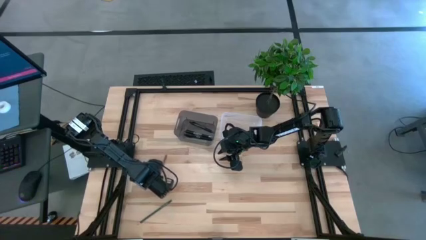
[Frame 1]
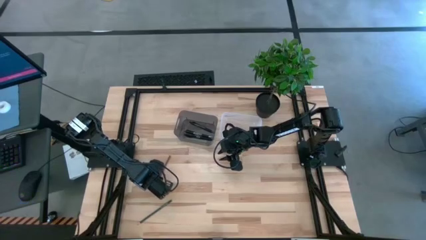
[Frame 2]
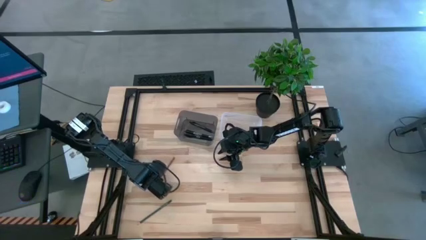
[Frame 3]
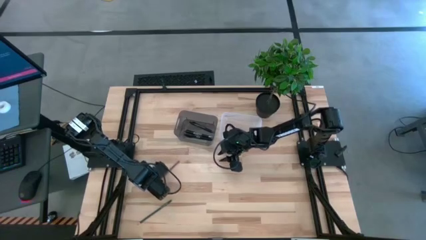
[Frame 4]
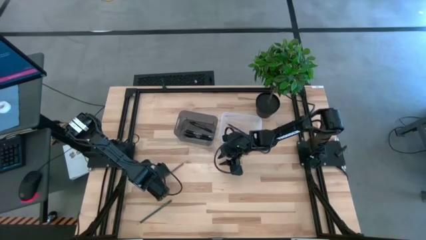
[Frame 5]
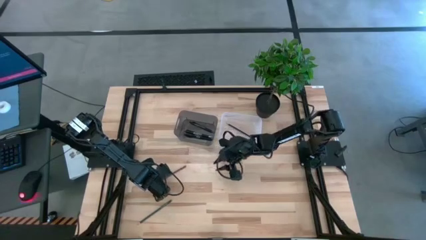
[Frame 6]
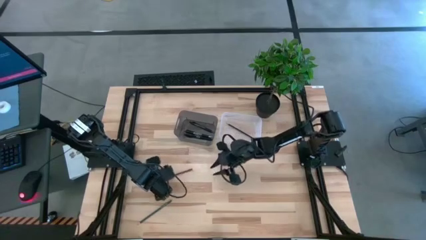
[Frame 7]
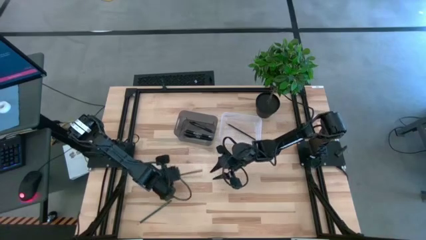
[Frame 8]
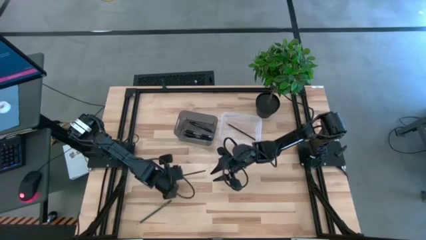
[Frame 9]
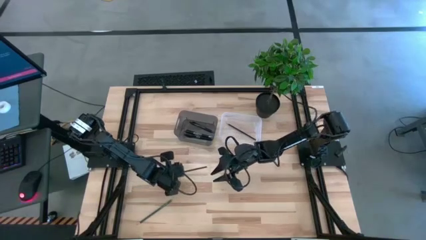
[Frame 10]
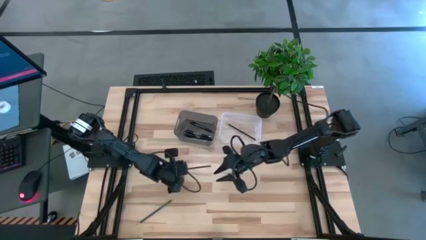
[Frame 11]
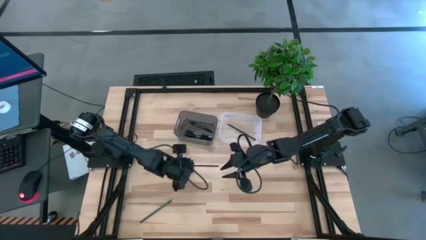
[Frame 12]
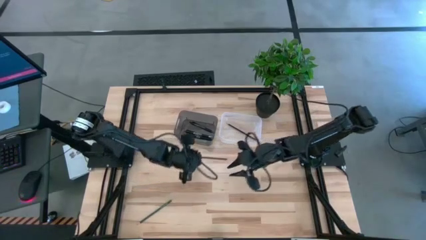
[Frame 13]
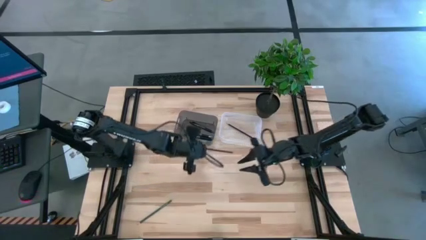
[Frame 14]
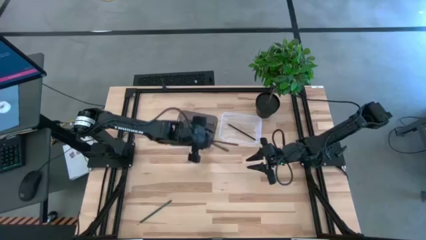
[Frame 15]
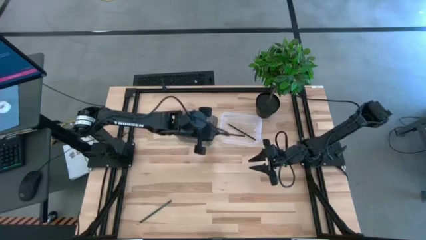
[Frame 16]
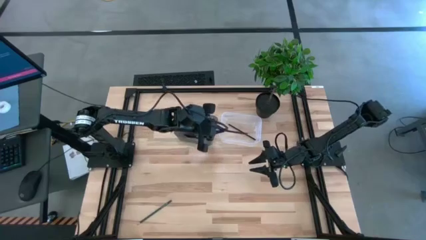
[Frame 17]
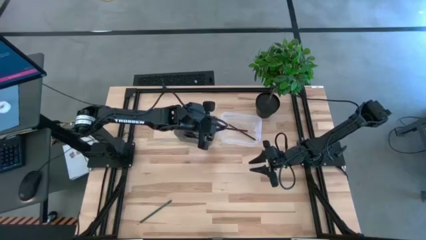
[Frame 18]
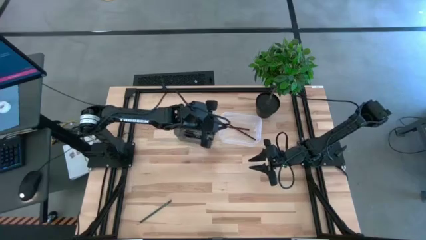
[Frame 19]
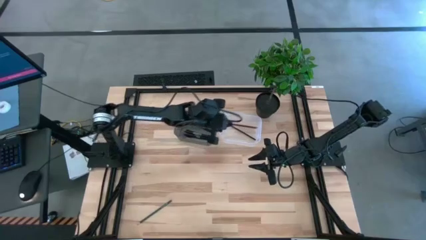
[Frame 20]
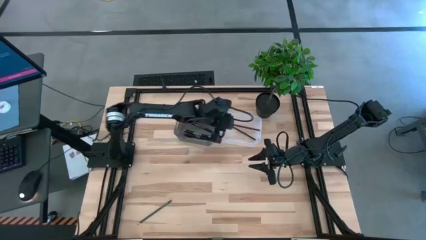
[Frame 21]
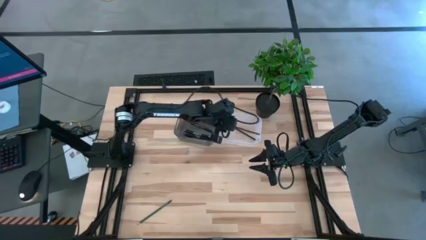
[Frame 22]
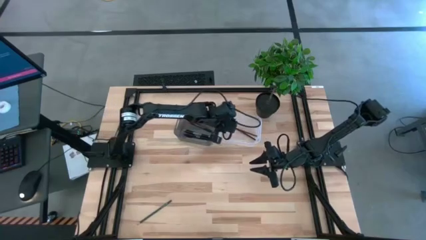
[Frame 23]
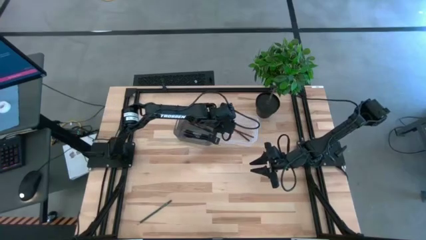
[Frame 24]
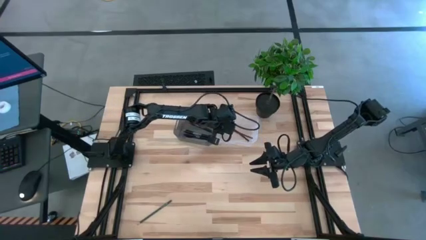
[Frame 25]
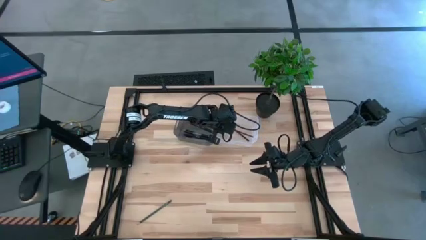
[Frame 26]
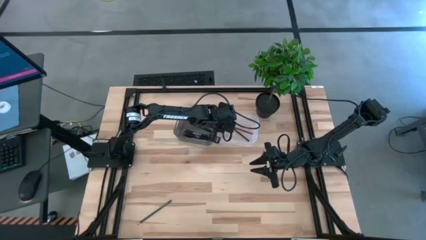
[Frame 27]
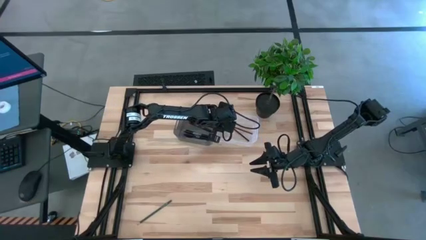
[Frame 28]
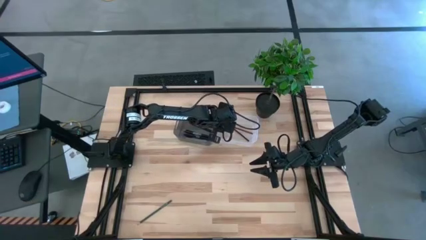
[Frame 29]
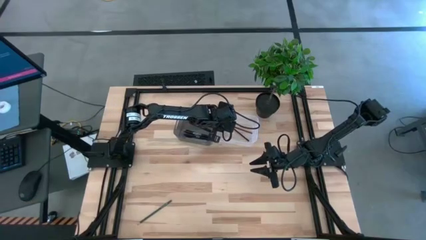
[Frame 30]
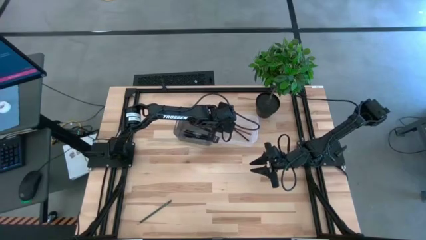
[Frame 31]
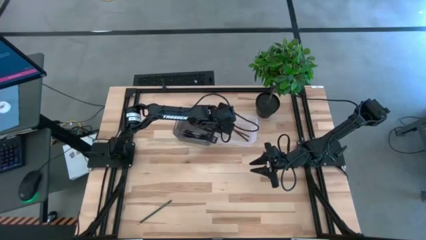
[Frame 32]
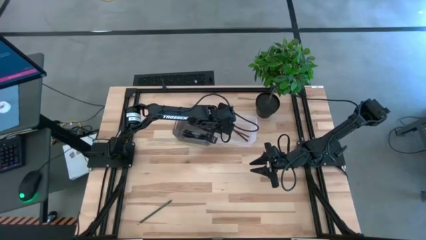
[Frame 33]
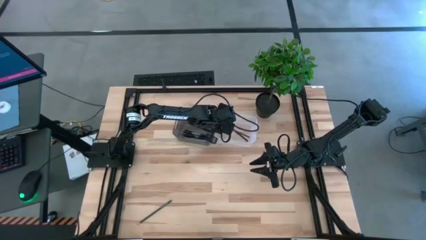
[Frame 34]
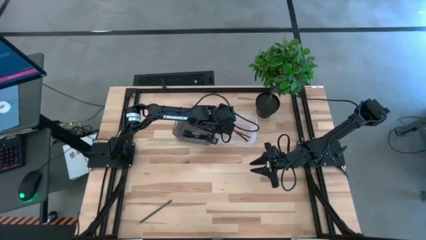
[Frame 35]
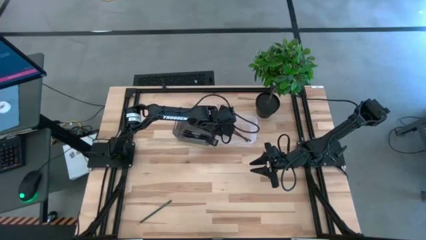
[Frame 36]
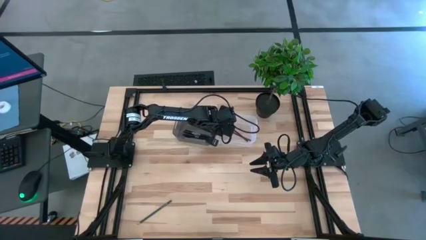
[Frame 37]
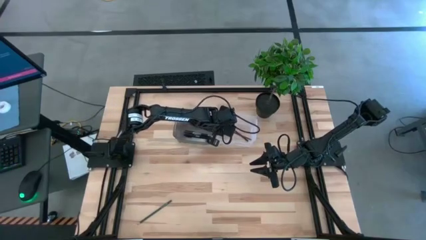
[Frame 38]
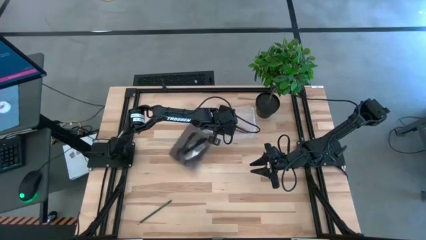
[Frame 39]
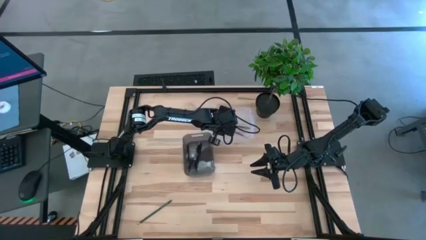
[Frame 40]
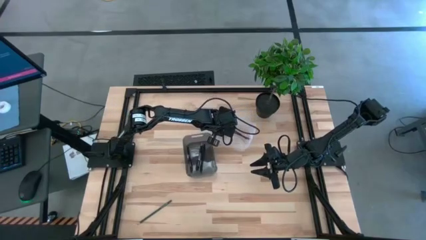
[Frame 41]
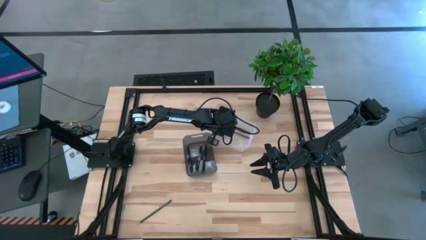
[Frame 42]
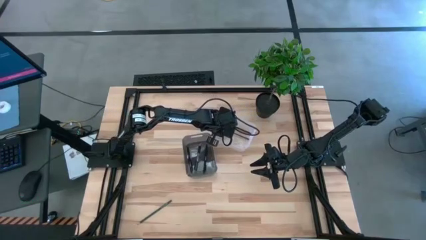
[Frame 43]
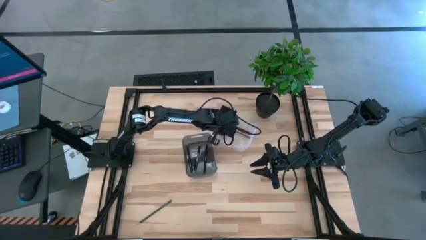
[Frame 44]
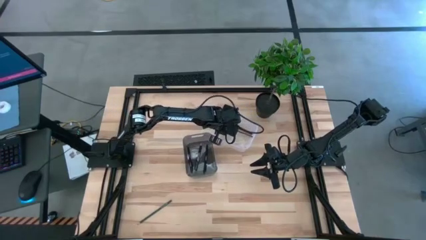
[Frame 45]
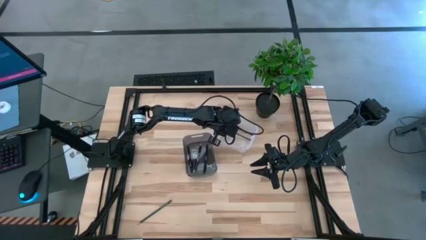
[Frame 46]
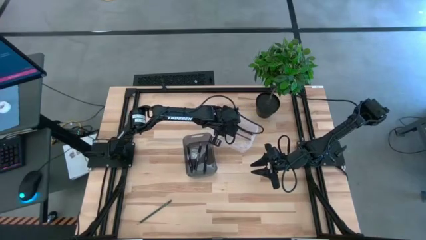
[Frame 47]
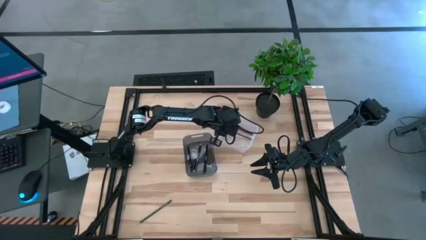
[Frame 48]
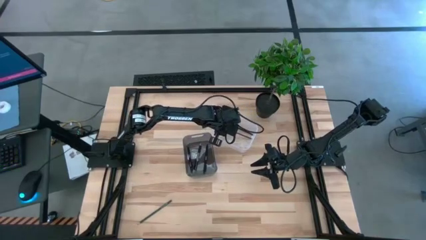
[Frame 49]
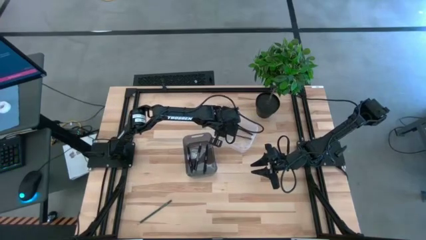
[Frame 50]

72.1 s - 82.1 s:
Task: Sort pens & pencils
Put the brown colored pencil into the transparent bin

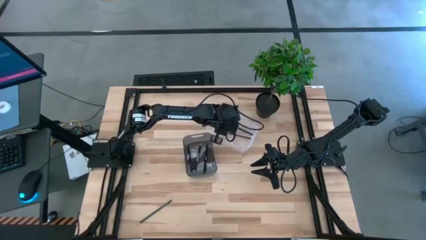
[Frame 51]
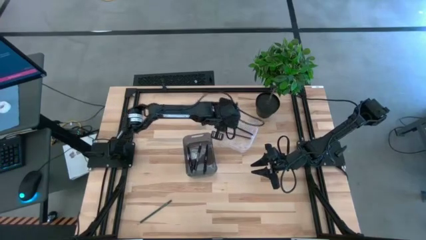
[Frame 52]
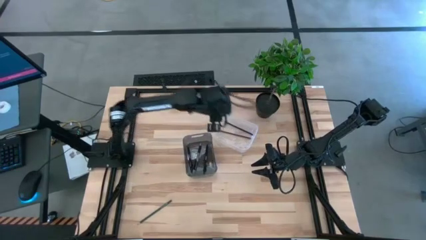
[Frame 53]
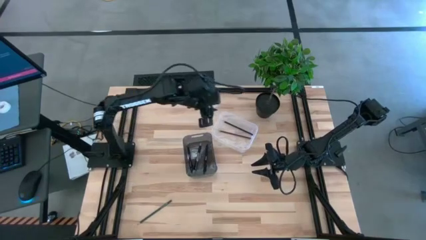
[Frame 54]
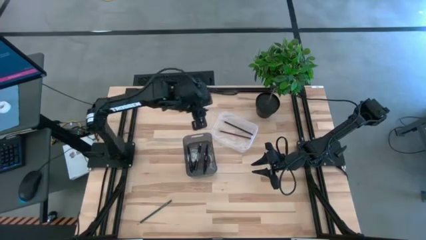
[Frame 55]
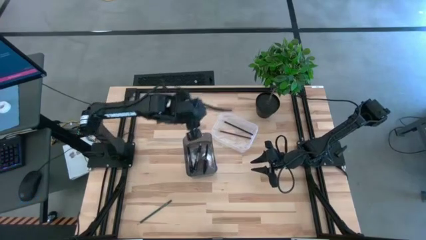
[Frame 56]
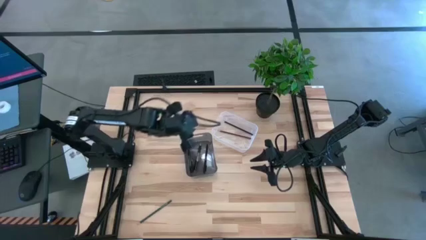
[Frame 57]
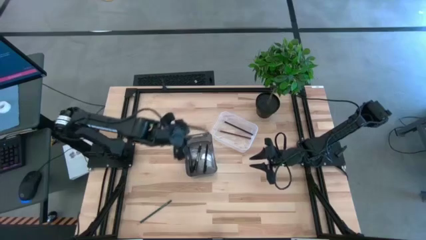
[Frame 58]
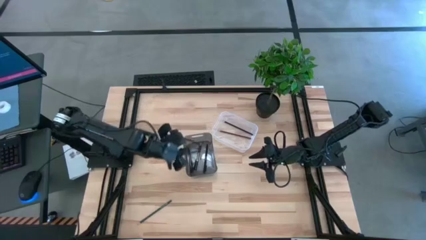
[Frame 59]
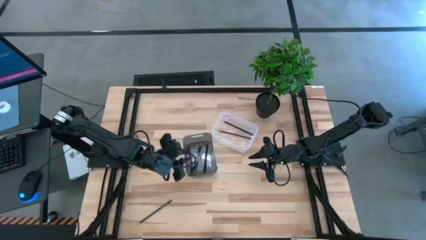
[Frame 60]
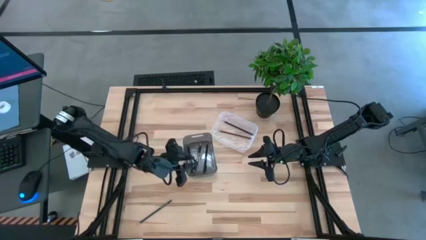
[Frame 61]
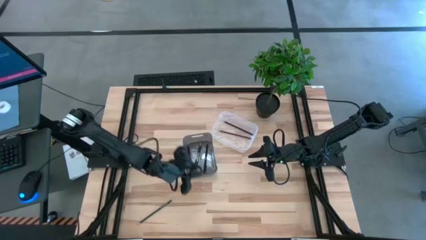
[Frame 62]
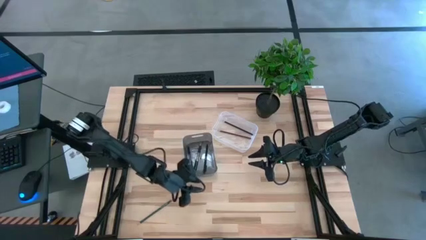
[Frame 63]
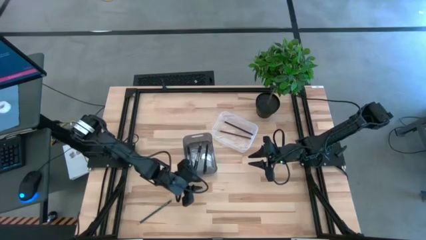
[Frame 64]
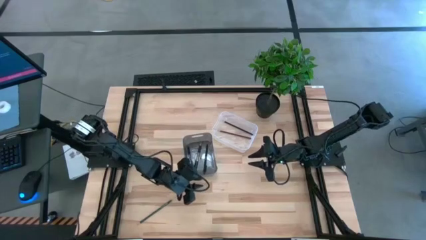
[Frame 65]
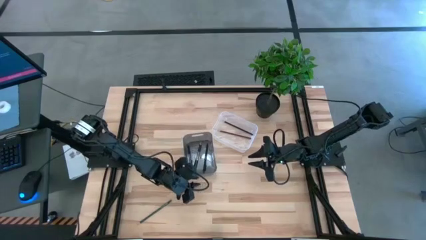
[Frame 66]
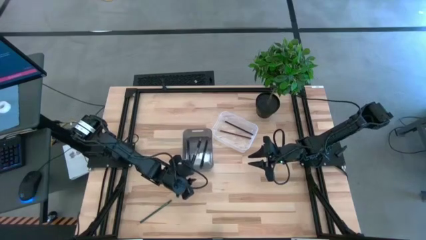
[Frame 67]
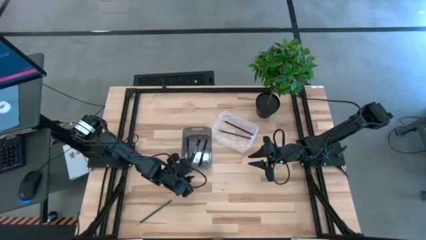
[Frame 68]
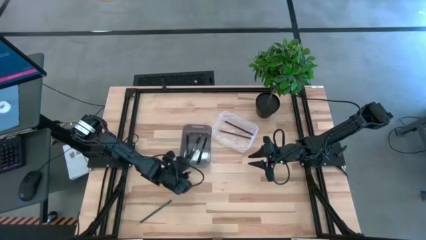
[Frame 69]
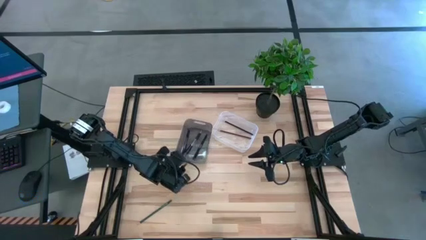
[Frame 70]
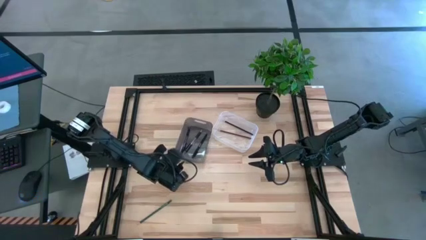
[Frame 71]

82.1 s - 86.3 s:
Adjust the black bin
